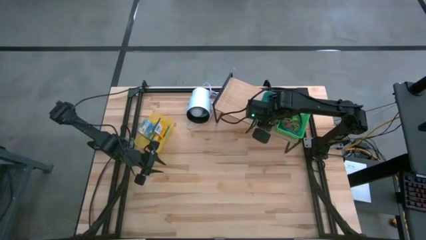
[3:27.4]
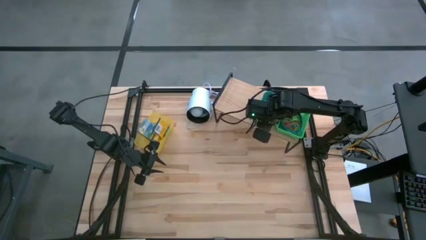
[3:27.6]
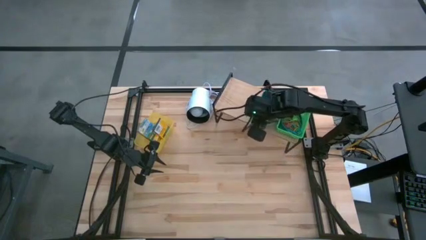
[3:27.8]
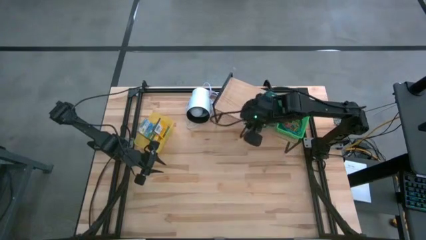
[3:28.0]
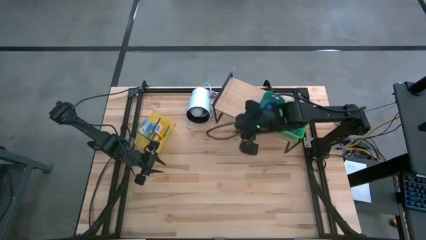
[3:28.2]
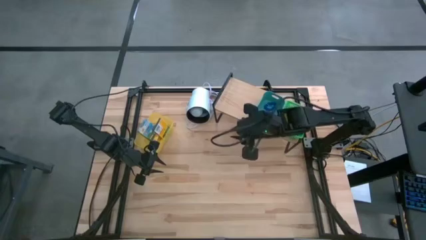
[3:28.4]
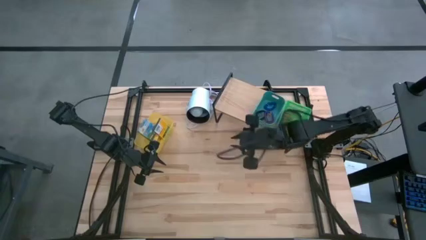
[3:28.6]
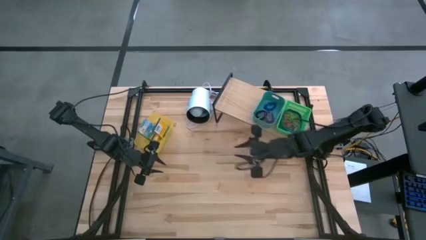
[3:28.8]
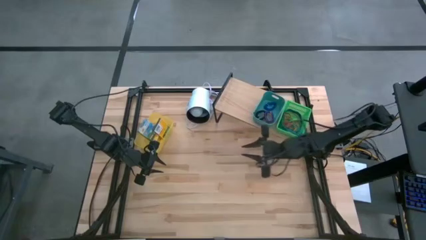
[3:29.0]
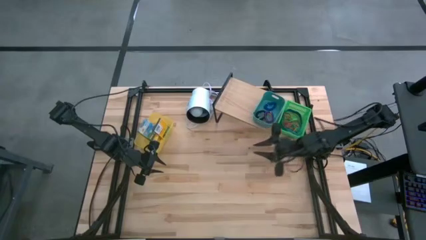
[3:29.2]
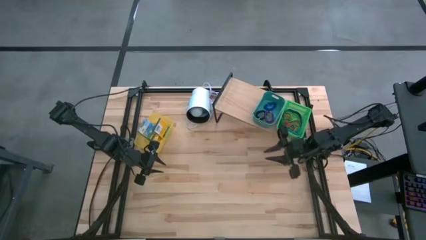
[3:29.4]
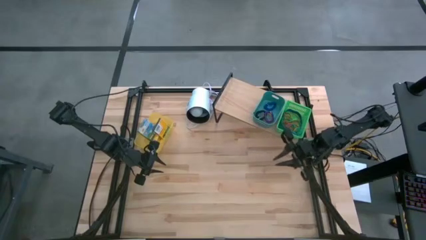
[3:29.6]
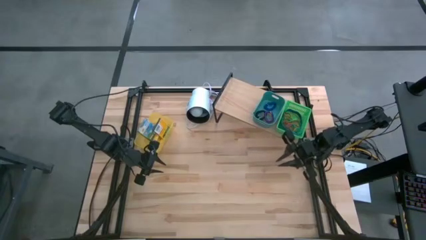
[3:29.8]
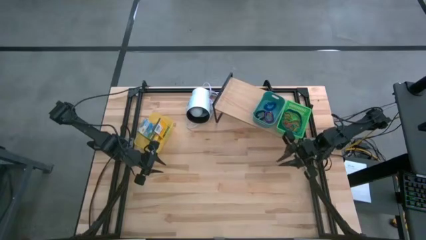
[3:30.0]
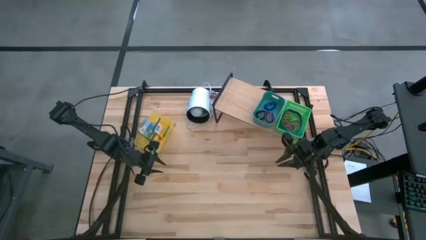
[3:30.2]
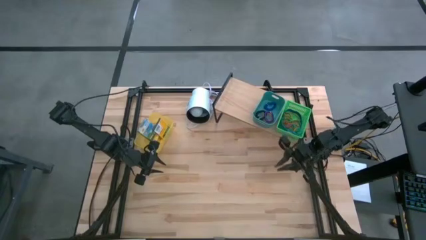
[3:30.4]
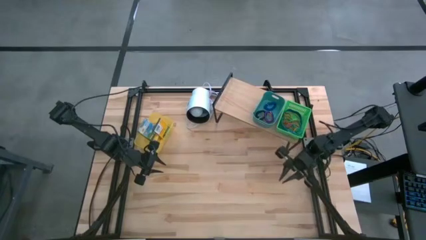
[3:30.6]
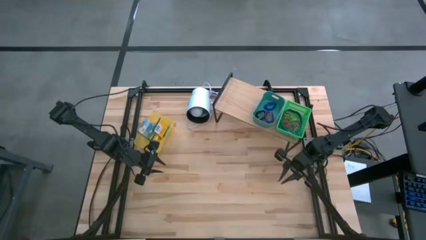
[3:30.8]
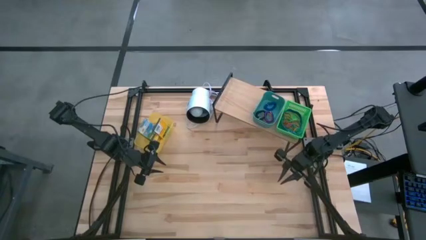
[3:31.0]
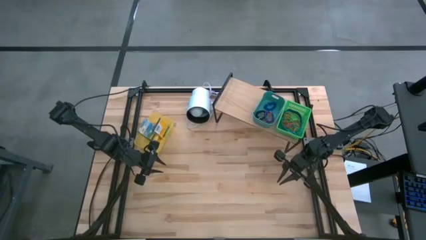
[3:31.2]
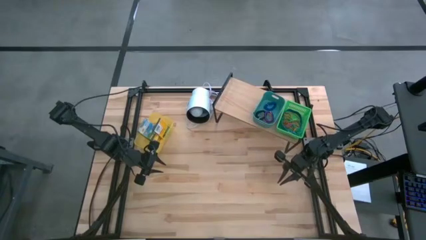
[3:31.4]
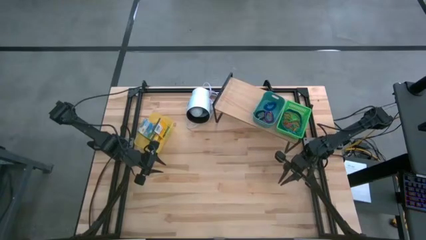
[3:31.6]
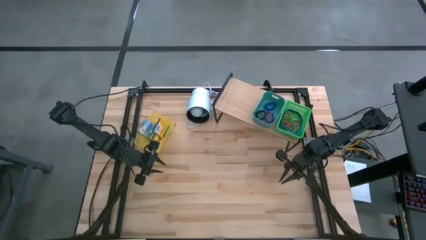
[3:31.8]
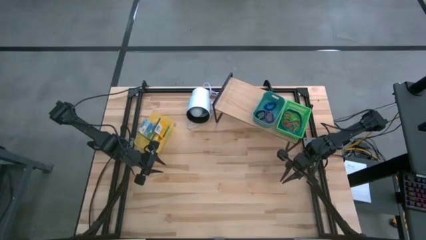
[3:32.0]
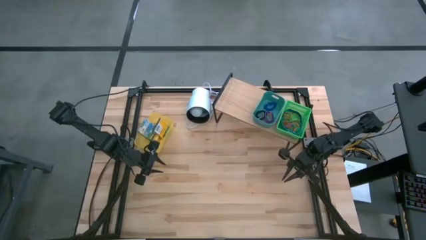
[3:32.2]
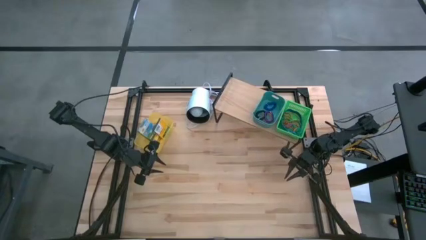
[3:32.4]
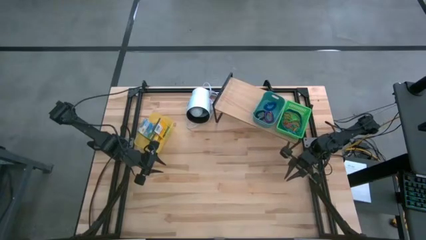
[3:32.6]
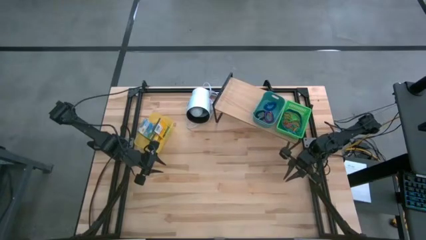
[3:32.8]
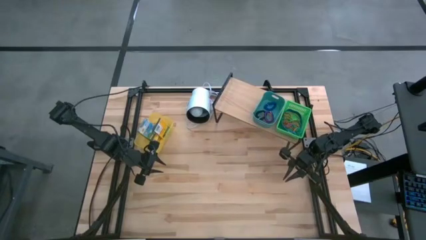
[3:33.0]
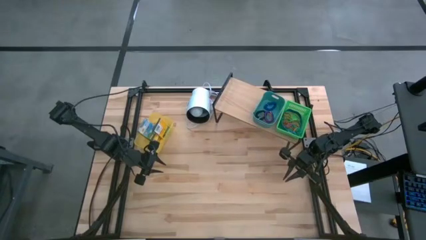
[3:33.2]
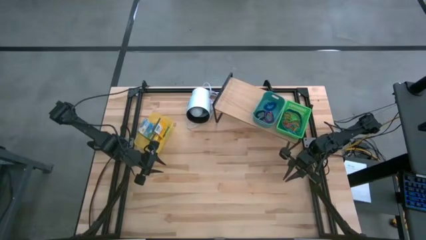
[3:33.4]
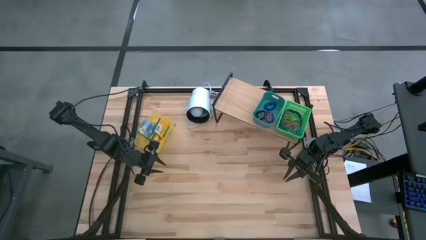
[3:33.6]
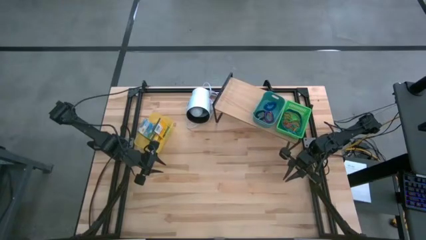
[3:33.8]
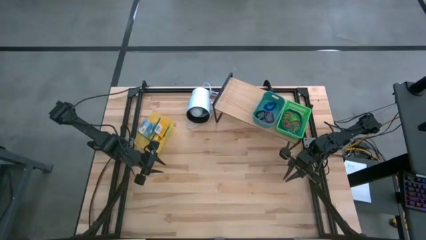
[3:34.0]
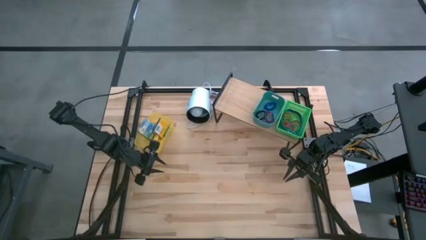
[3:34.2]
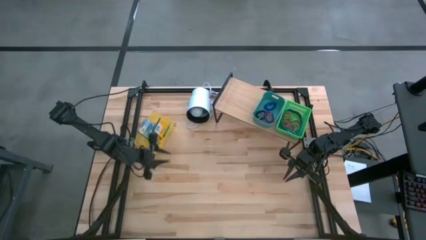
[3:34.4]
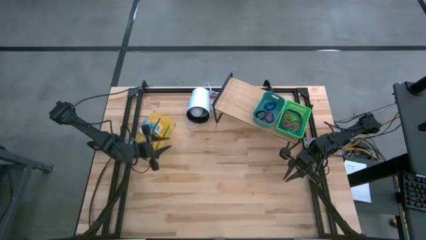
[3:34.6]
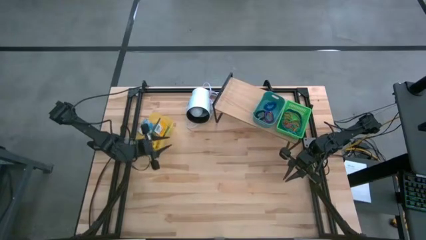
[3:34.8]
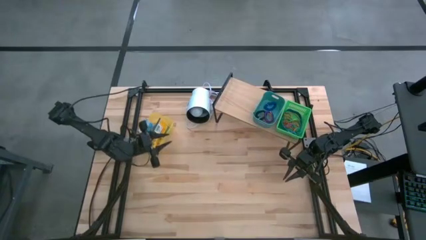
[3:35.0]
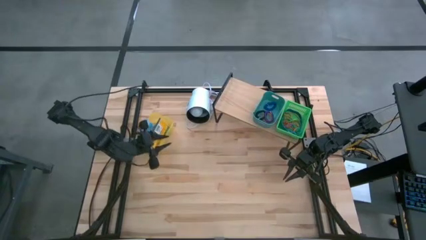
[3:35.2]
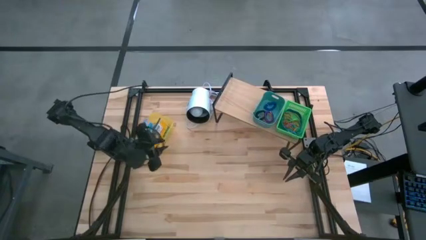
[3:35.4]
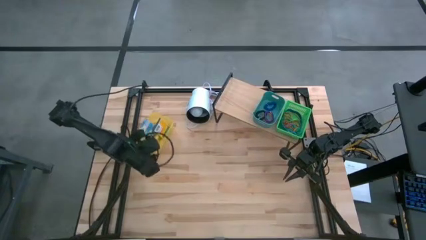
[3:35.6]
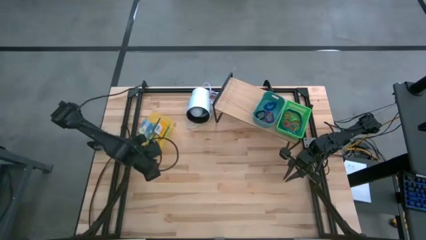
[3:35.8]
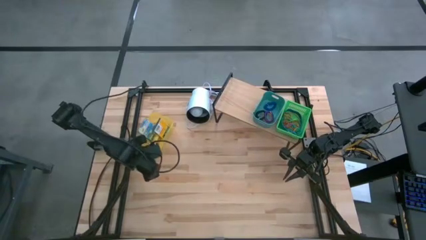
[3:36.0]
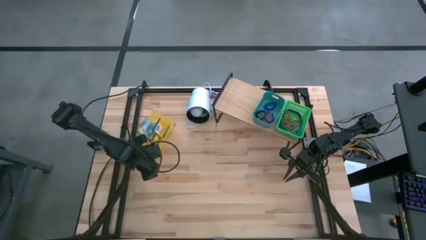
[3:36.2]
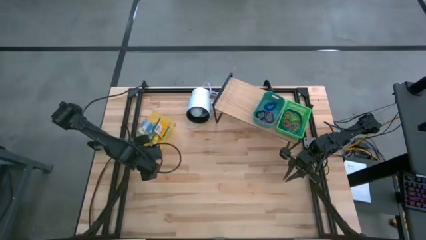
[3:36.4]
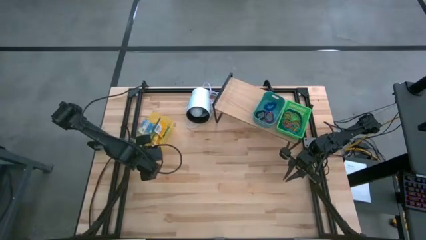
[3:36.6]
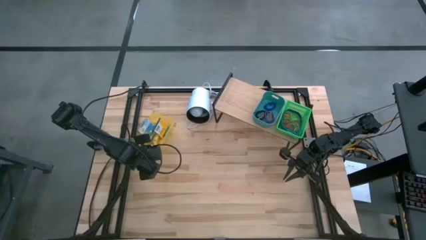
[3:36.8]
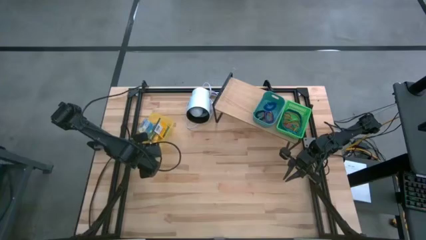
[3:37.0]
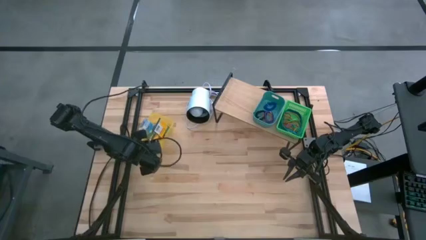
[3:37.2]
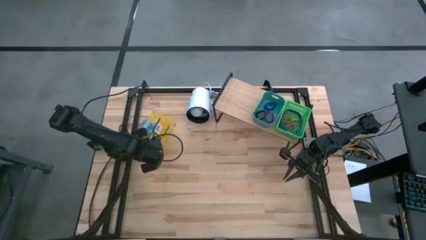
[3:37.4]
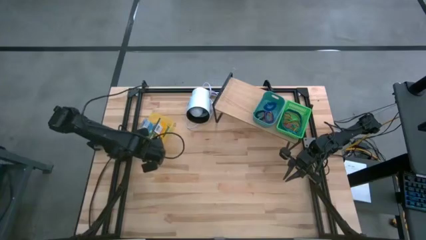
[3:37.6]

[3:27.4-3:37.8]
Task: Pick & Place Office Desk Supplies
Put the yellow bin on the shelf
